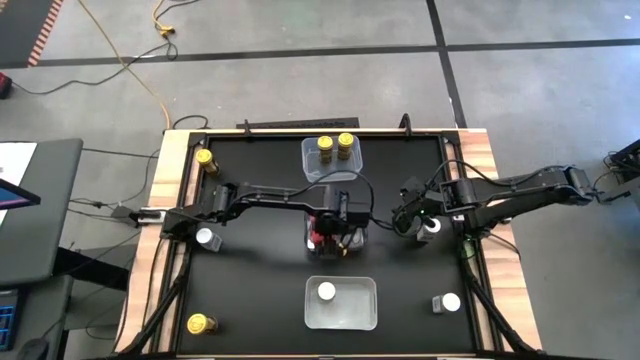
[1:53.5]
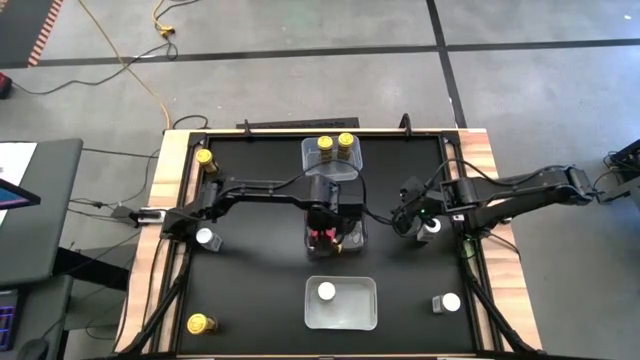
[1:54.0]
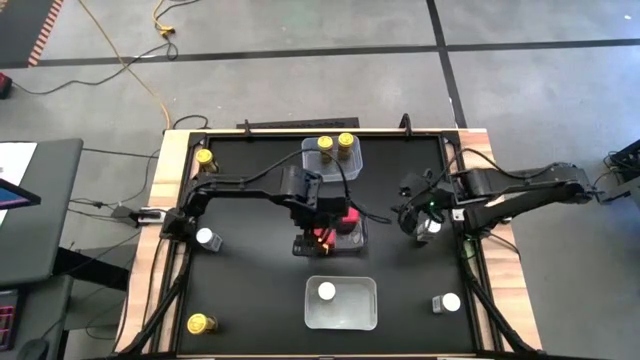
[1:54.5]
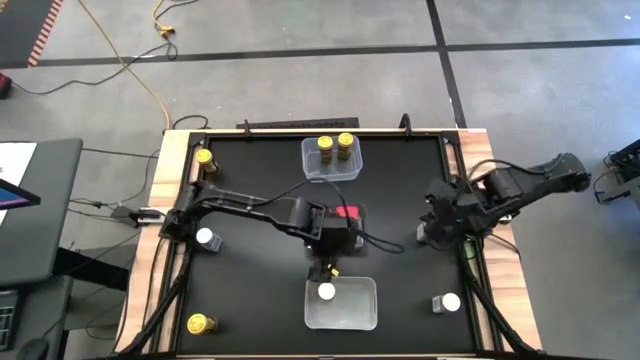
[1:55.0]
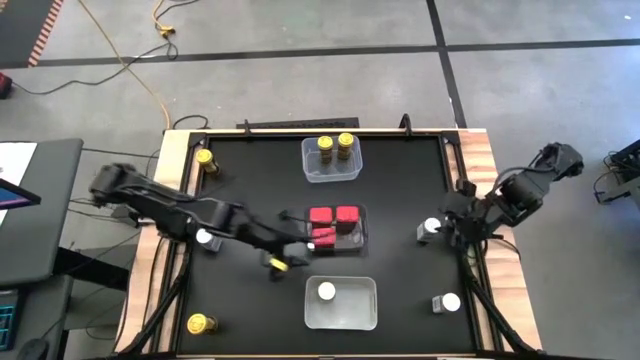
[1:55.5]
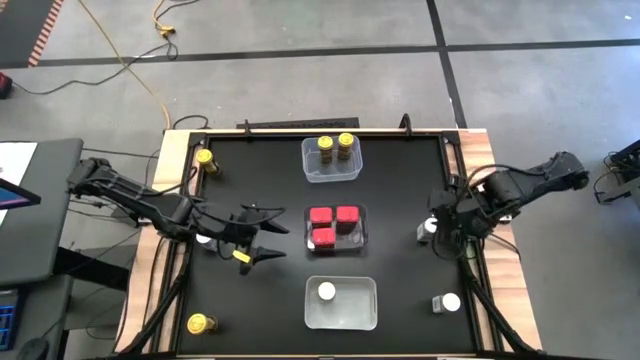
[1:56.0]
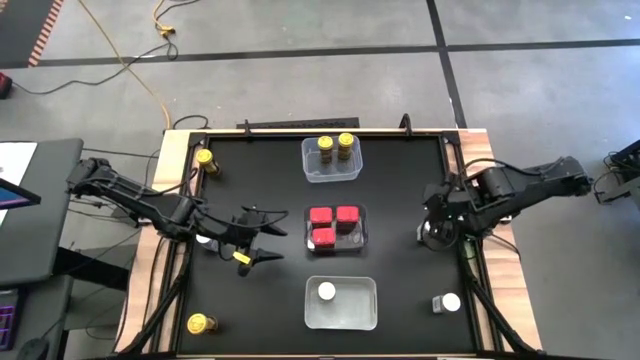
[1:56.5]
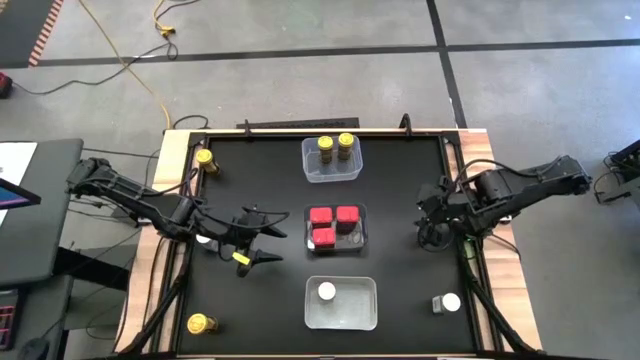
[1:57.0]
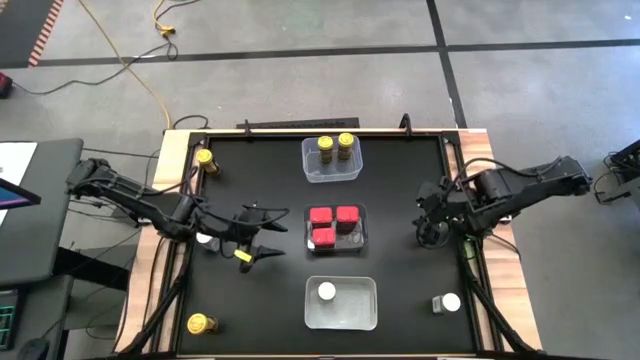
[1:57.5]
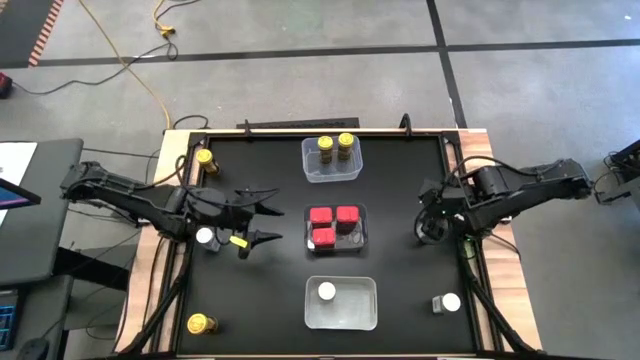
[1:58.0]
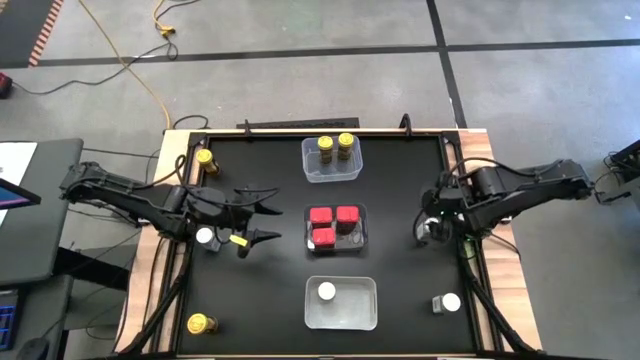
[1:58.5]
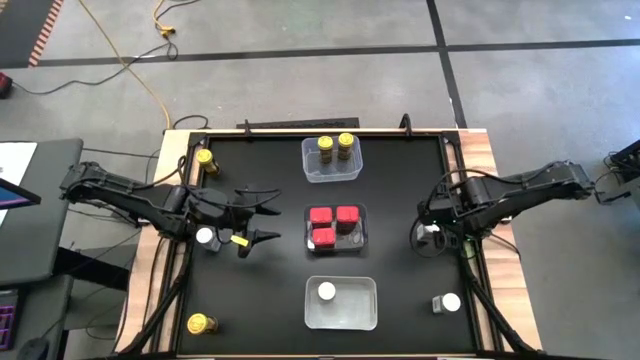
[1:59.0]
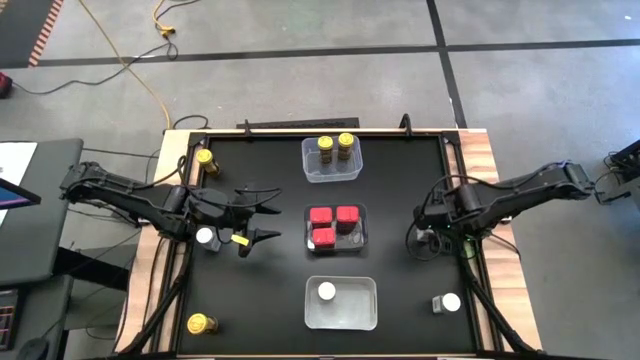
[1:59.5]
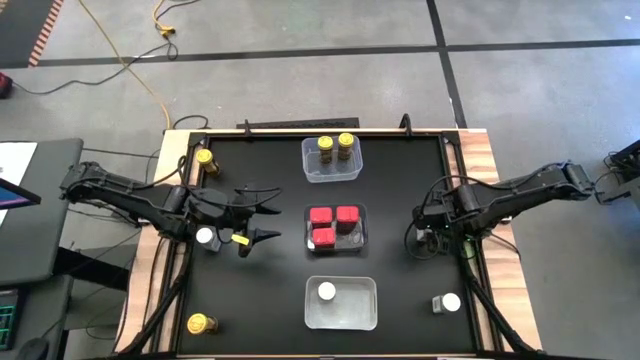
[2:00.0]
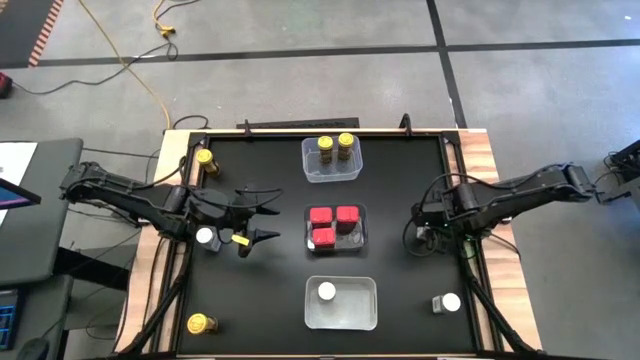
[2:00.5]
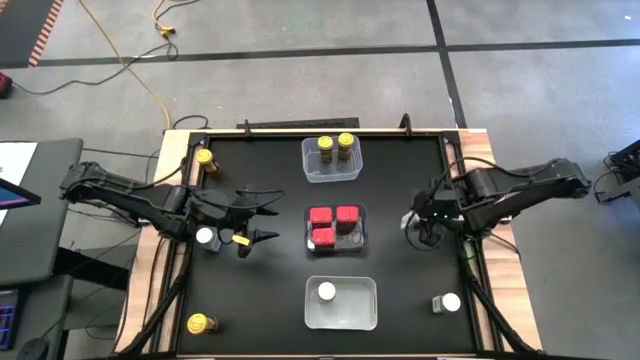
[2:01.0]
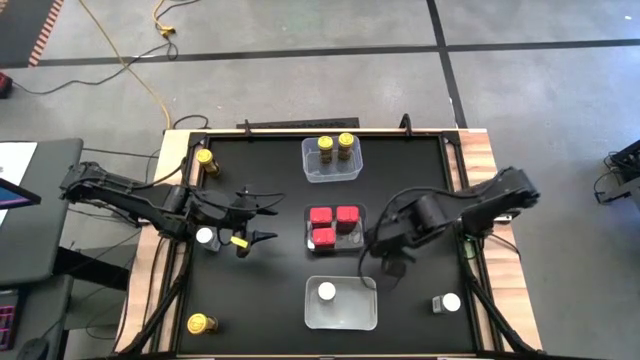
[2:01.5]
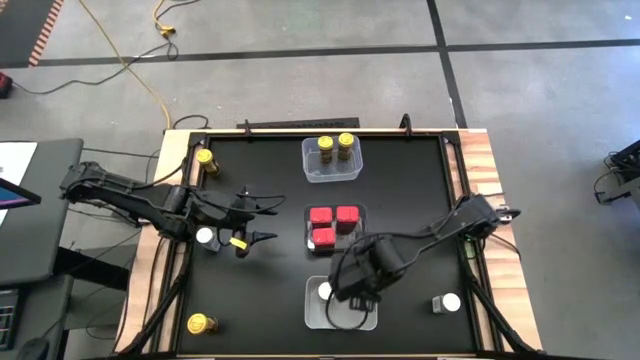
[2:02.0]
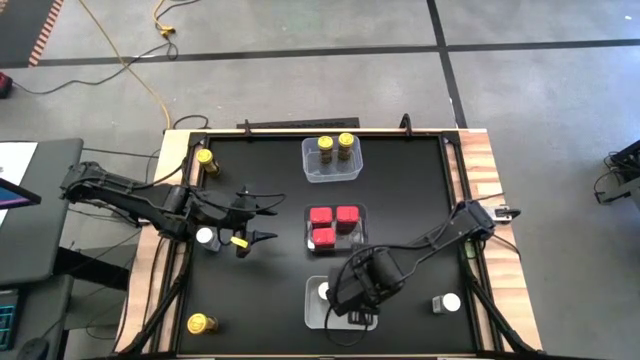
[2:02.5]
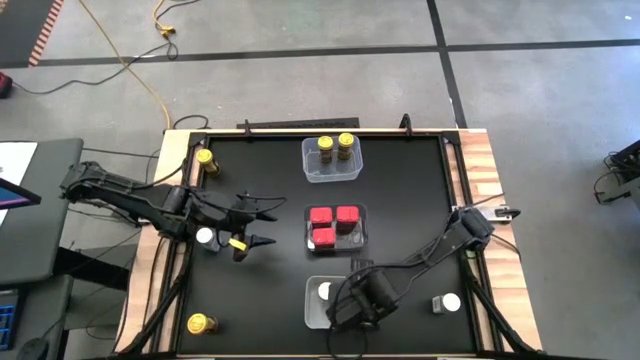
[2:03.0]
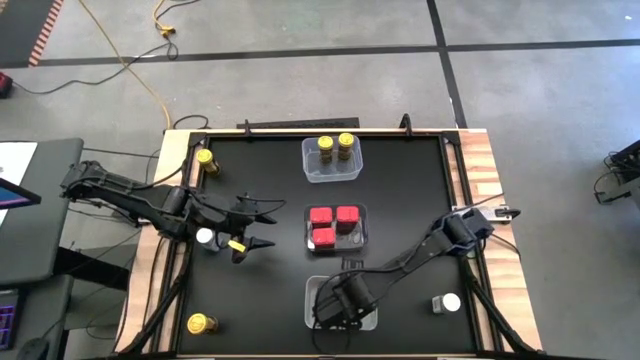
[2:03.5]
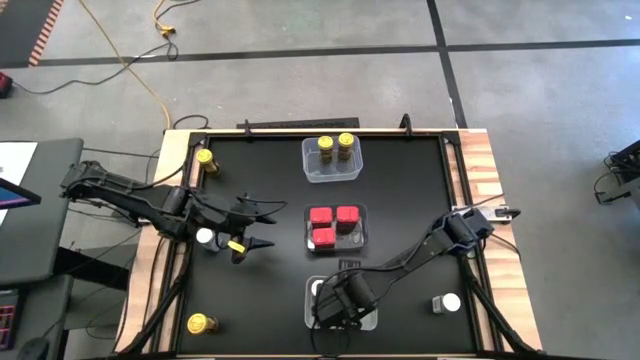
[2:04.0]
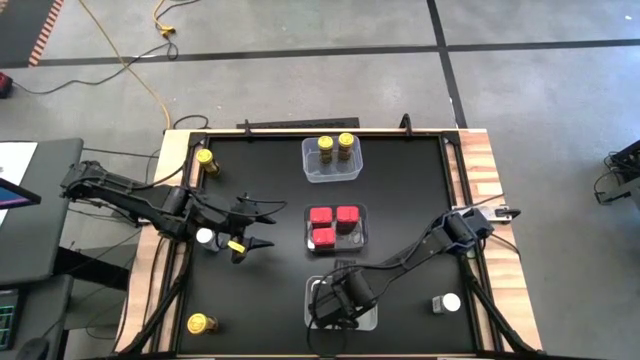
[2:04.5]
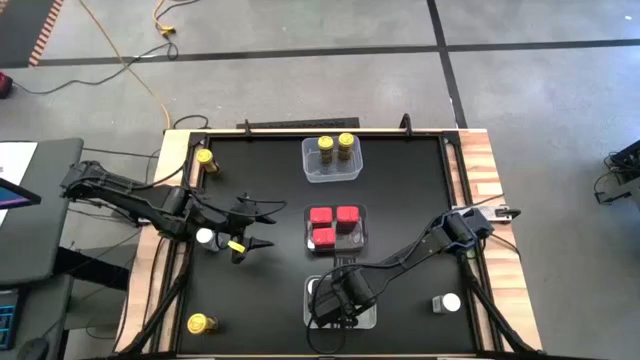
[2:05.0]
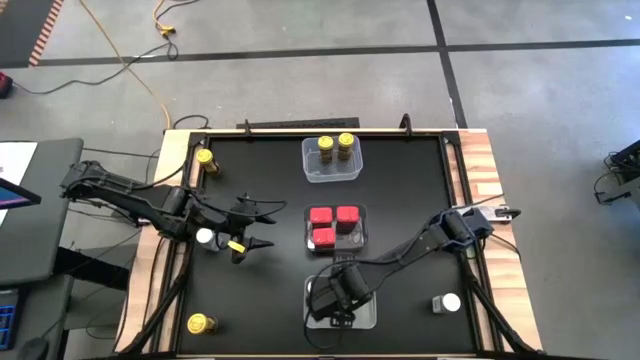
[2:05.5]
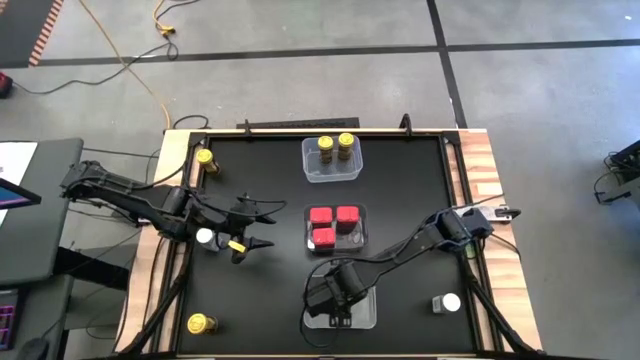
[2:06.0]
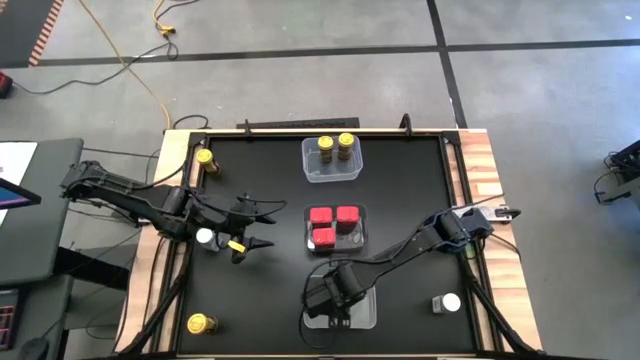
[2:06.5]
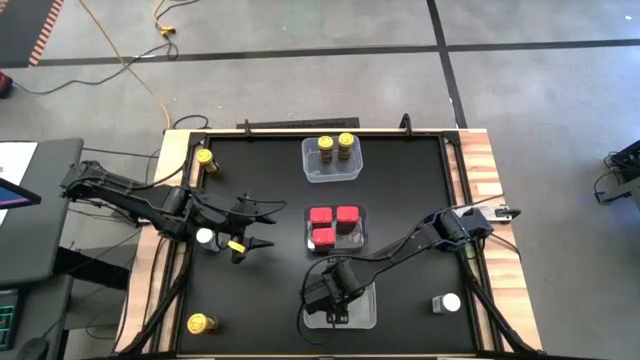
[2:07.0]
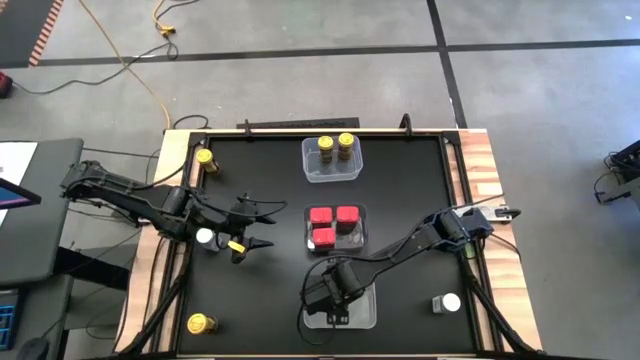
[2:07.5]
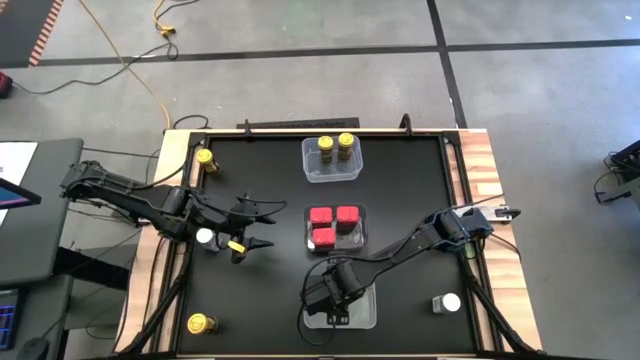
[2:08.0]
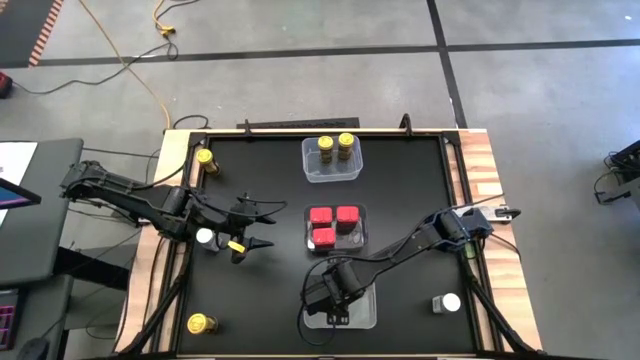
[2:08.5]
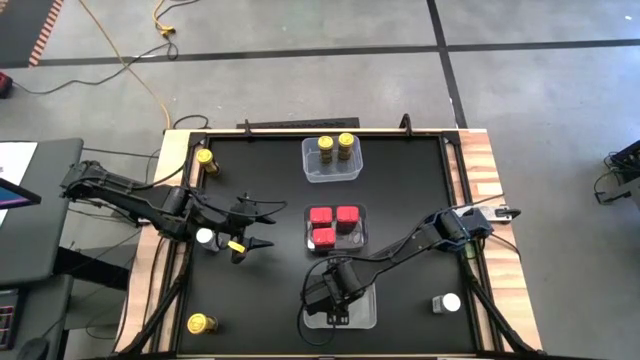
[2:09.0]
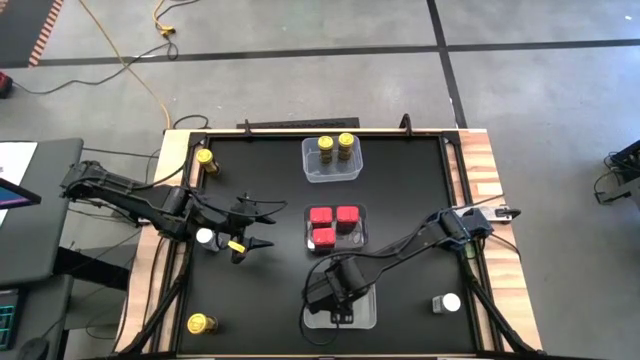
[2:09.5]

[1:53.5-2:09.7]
Task: Sort spices by type
Put the top right white seasoning bottle into the gray bin

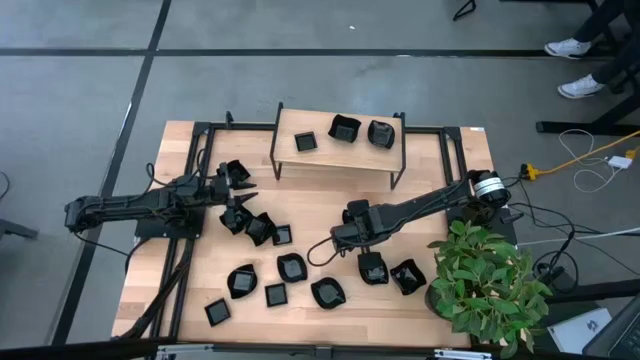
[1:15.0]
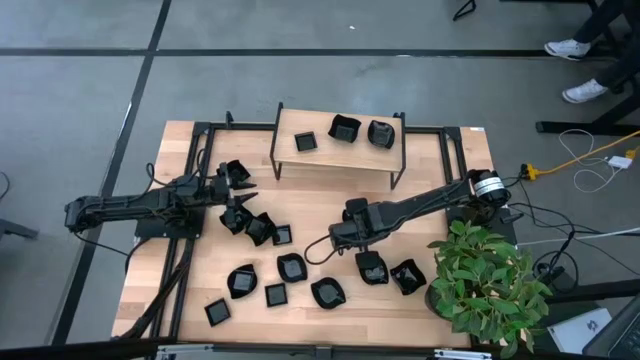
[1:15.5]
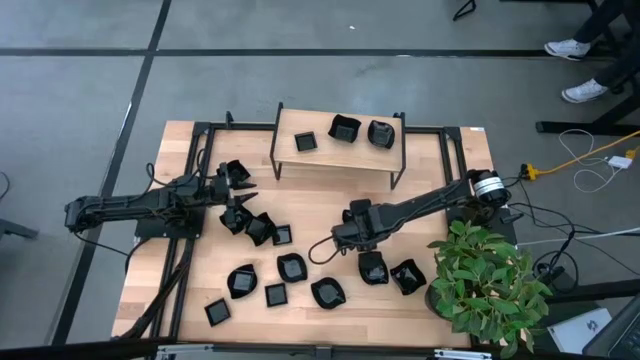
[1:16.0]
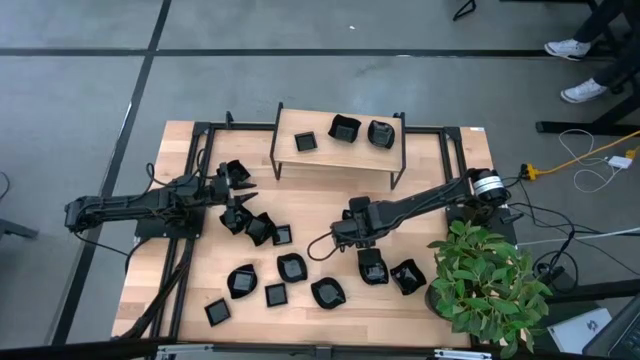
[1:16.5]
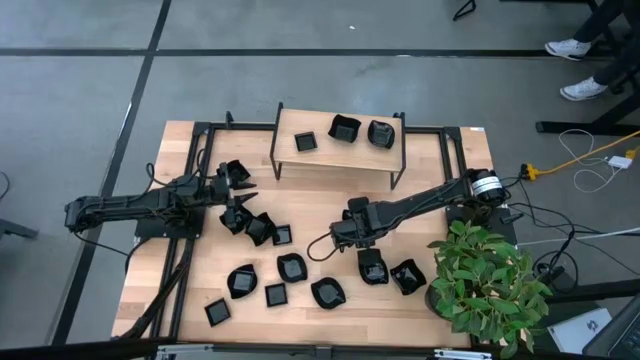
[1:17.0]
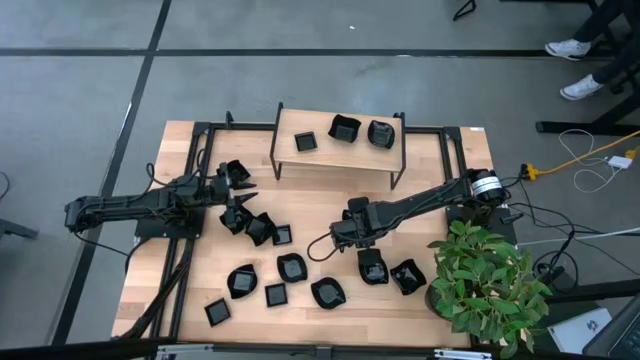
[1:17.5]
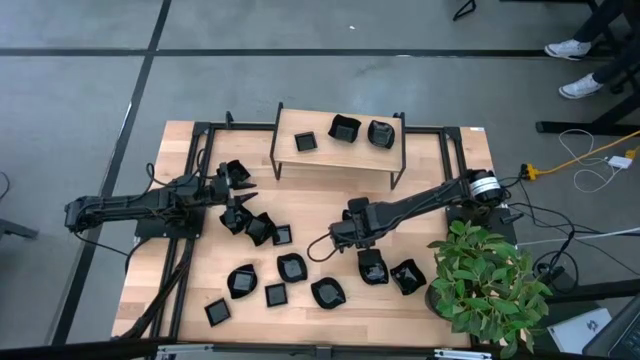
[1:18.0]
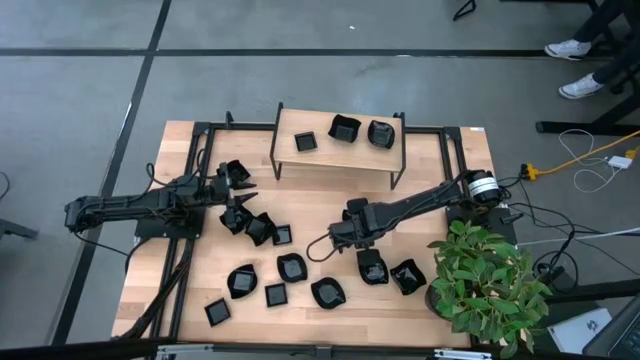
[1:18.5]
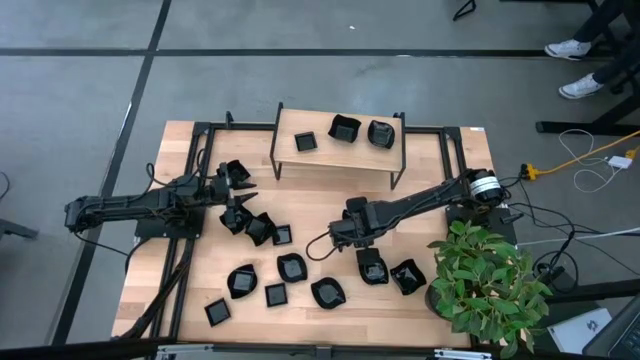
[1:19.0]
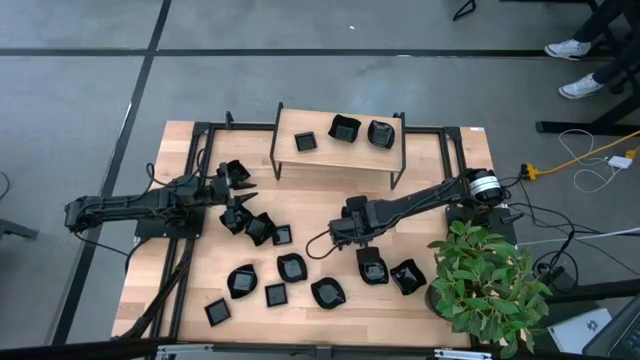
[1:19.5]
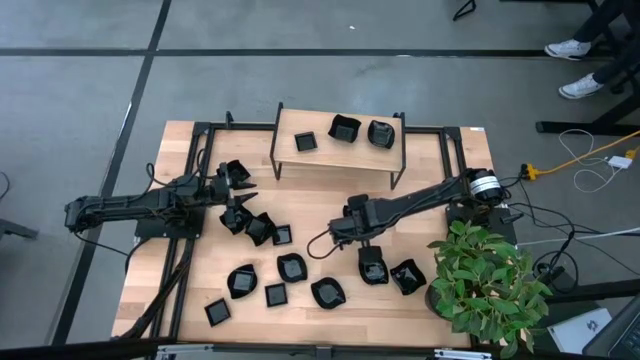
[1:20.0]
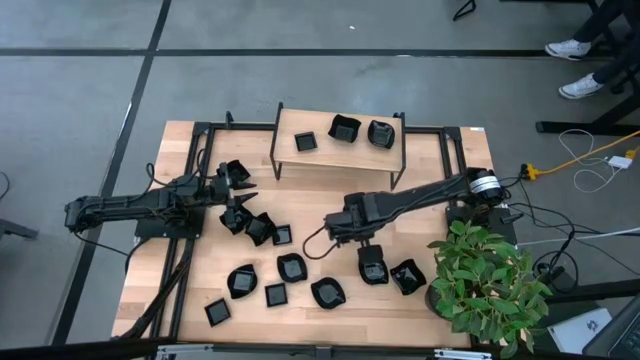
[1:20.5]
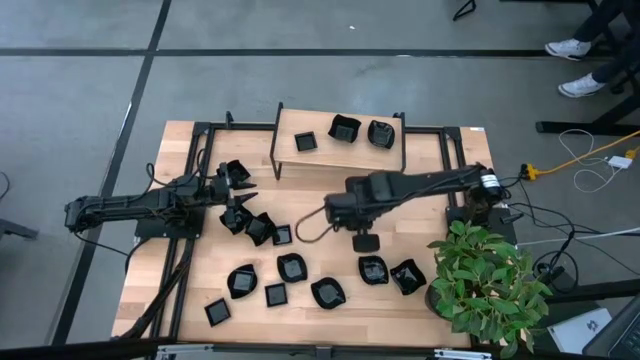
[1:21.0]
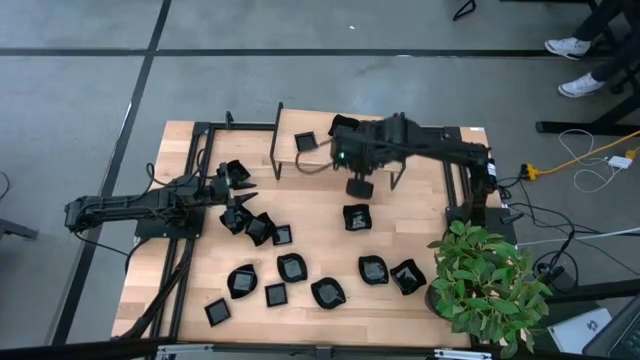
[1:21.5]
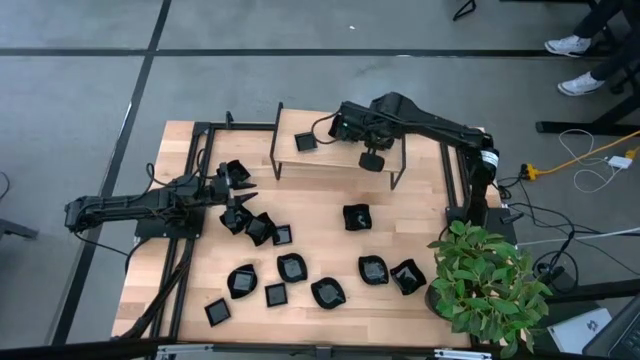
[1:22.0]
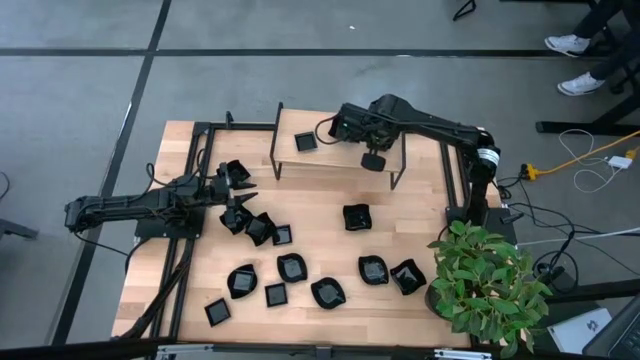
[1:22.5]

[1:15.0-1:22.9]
Task: Pick & Place Mini shaped plates
Stack the leaf-shaped plate on top of the leaf-shaped plate on the shelf
